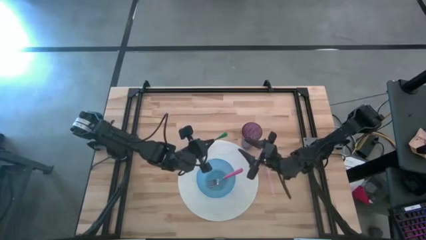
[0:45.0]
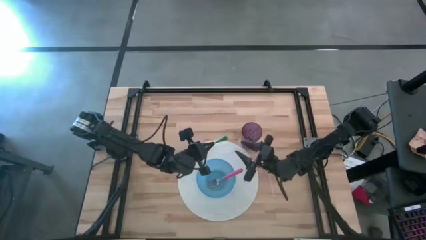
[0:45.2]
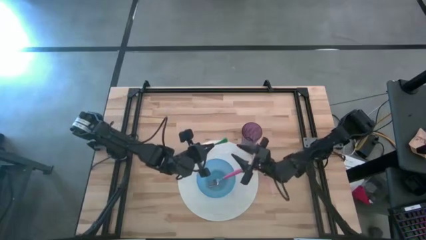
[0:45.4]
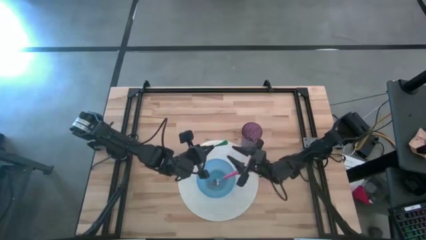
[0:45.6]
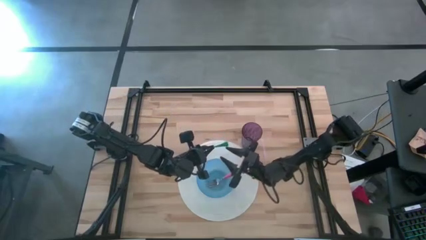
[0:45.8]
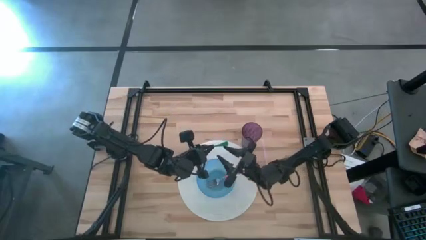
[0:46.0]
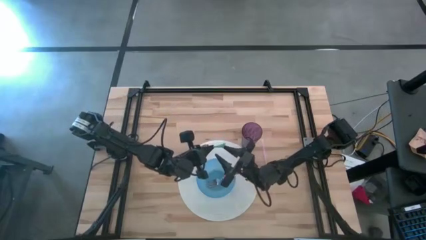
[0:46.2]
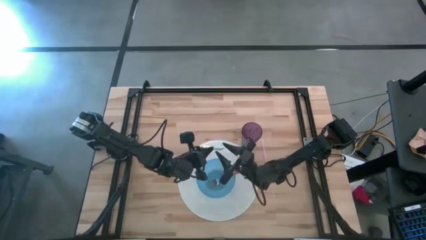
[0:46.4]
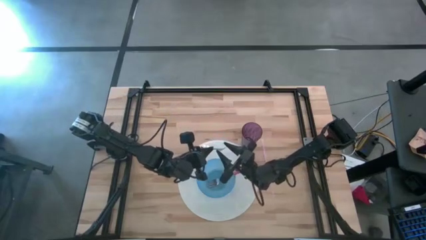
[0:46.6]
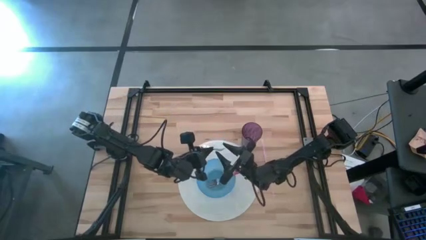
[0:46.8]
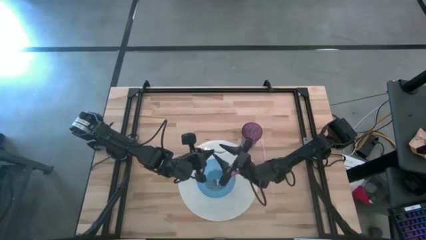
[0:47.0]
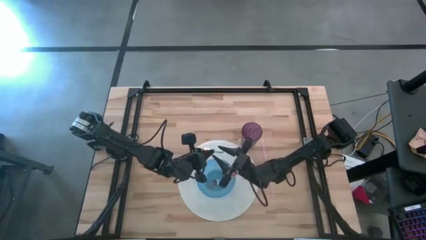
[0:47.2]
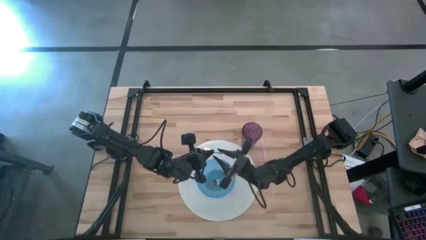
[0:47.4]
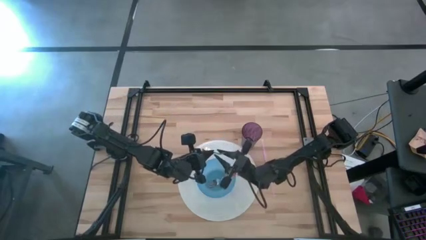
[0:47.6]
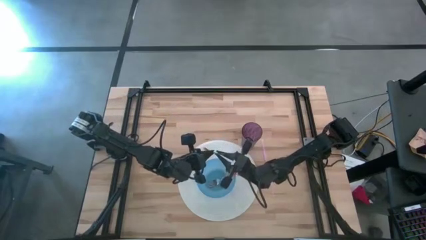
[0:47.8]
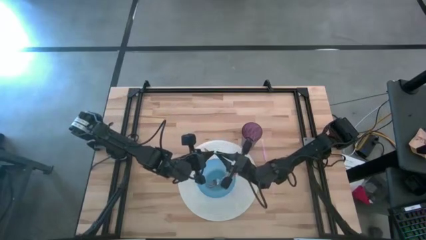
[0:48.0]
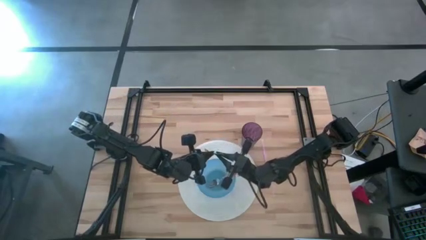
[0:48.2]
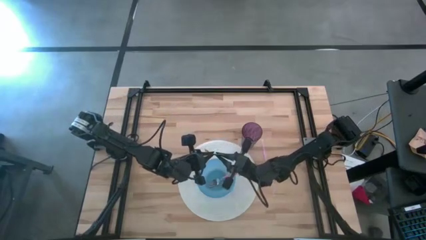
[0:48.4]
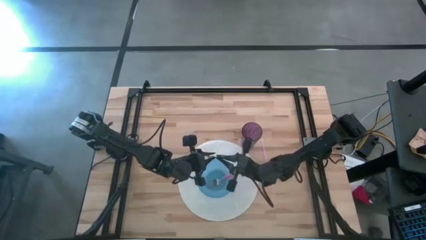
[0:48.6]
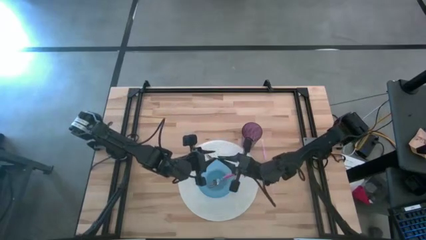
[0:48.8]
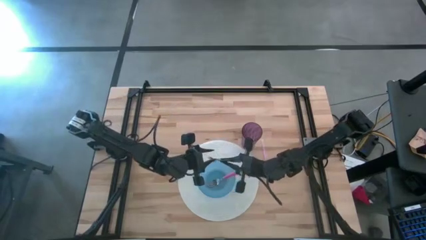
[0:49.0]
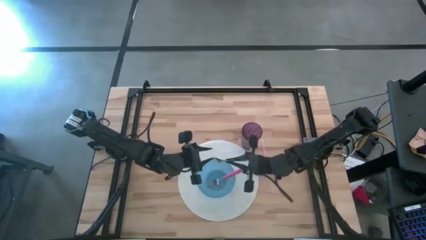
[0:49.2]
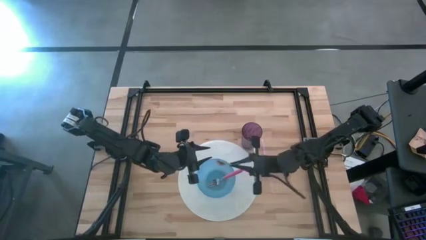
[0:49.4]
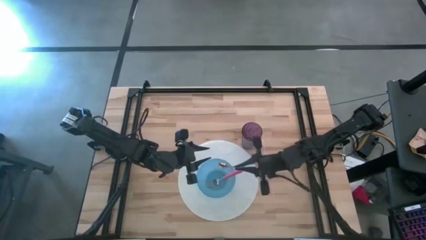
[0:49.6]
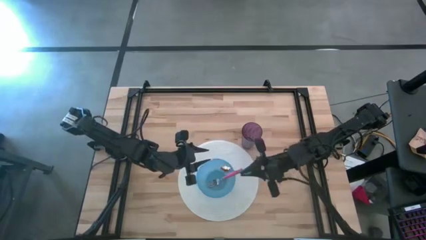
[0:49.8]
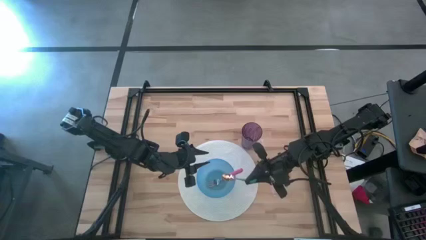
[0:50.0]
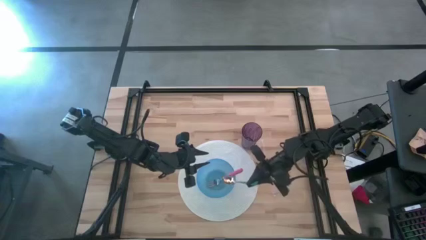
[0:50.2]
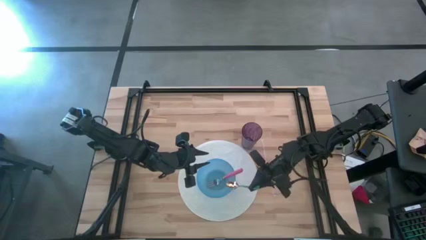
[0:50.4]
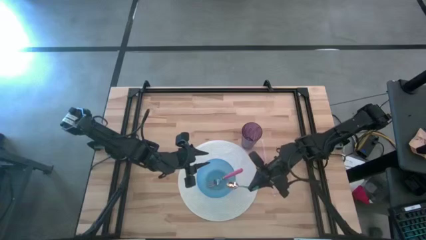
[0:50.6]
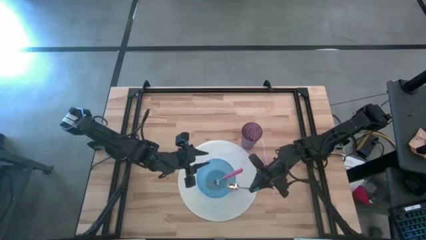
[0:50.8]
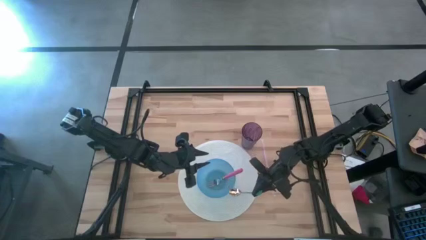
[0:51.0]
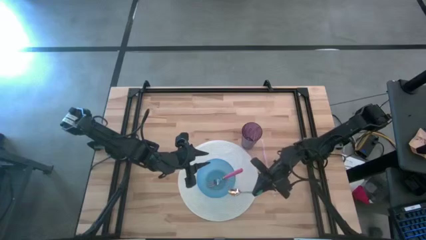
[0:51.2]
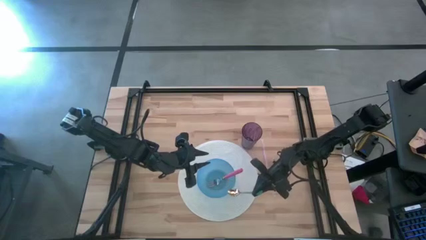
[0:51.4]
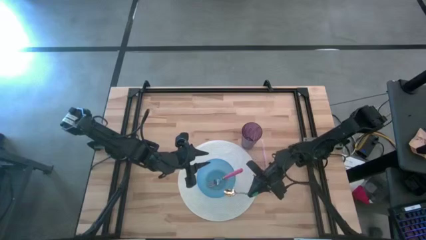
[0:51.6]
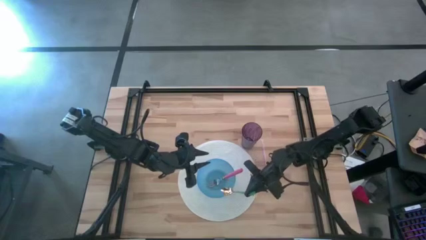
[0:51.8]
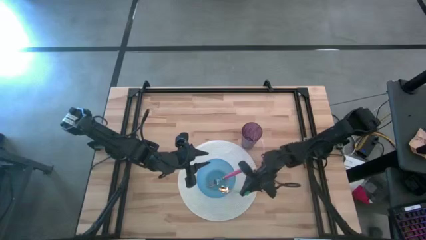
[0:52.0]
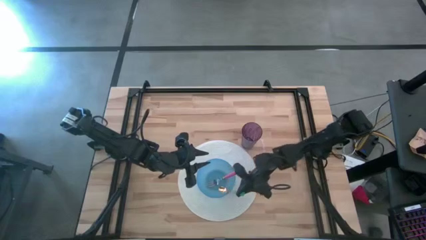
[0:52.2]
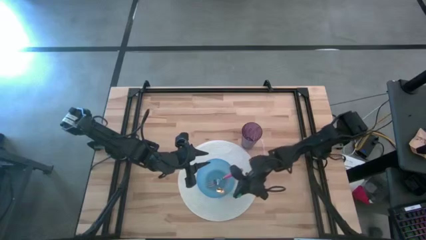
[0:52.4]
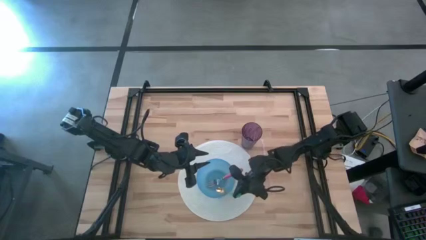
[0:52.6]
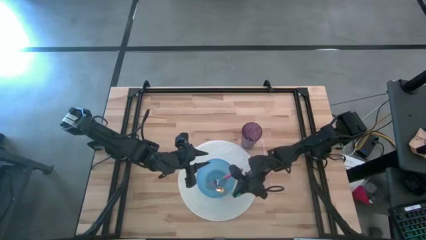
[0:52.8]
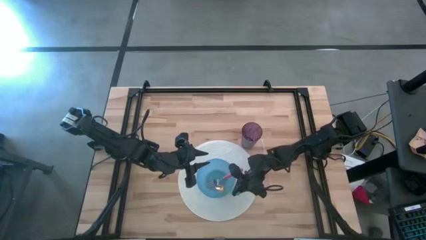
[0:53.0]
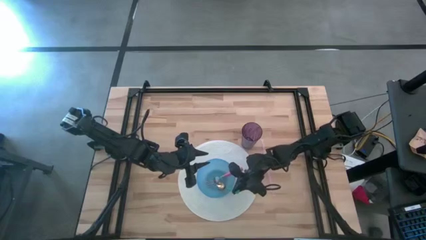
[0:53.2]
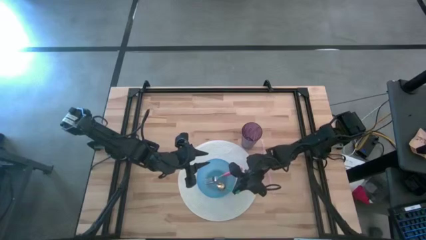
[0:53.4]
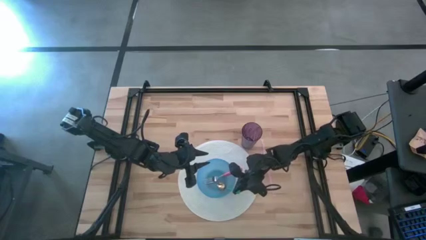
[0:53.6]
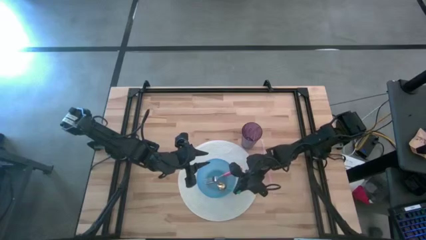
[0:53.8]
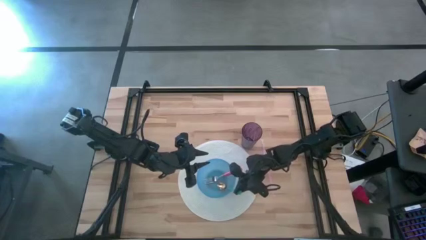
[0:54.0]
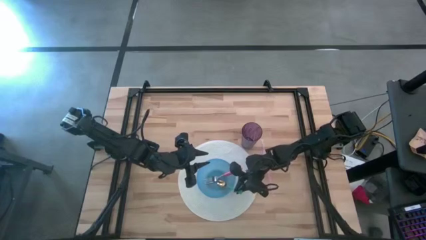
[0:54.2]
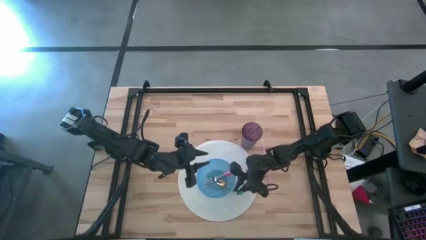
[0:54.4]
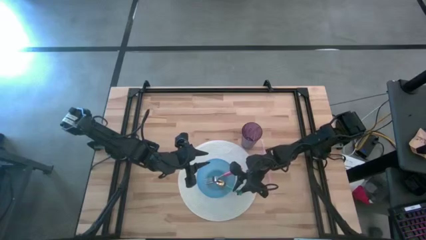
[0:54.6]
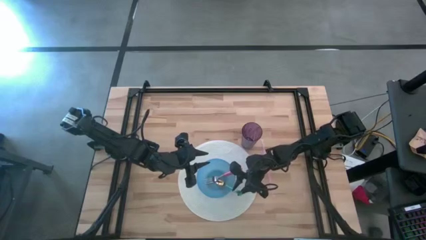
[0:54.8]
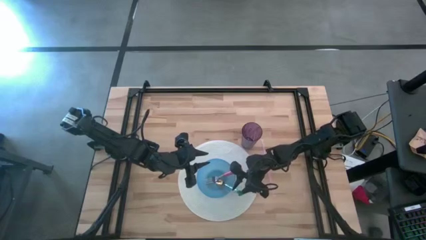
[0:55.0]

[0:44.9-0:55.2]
Task: Pick & Place Utensil
Put the green spoon into the blue bowl
